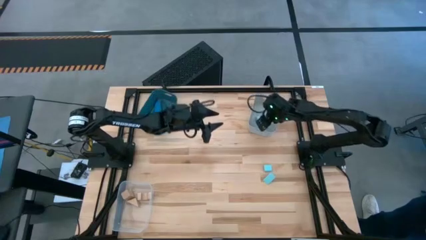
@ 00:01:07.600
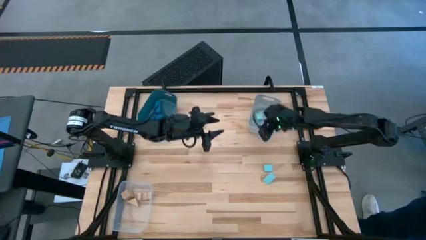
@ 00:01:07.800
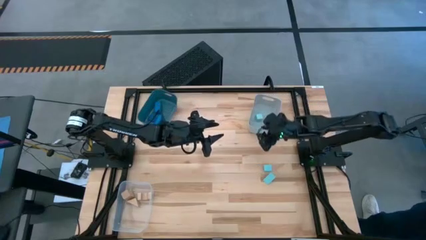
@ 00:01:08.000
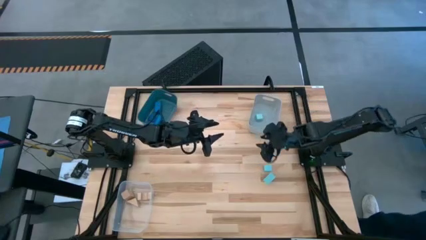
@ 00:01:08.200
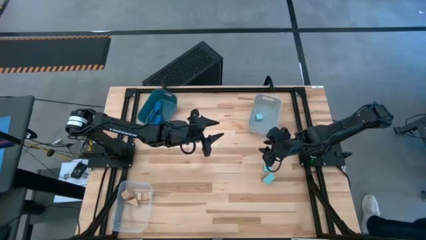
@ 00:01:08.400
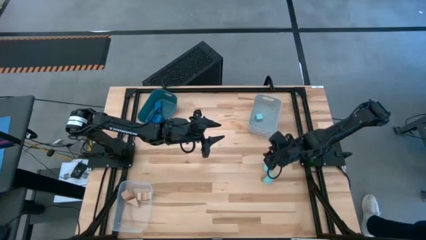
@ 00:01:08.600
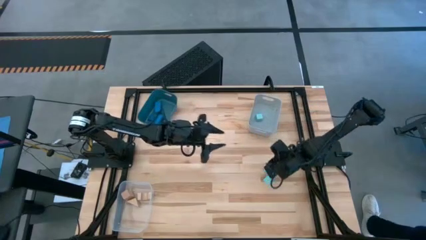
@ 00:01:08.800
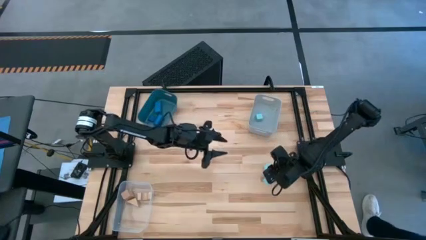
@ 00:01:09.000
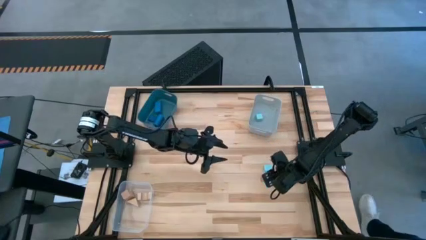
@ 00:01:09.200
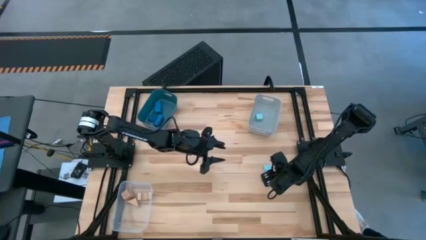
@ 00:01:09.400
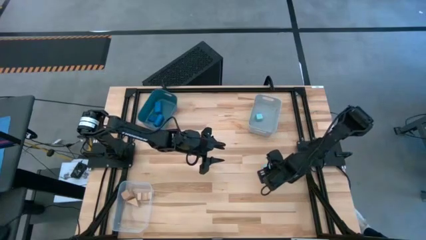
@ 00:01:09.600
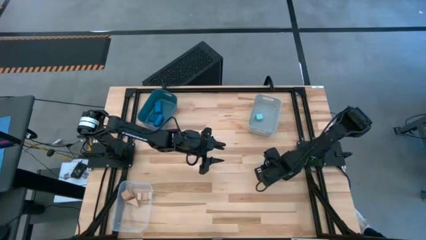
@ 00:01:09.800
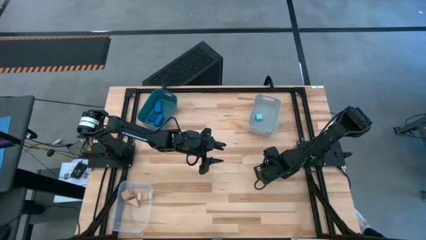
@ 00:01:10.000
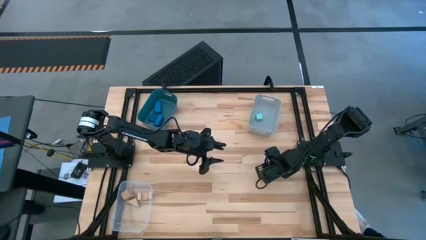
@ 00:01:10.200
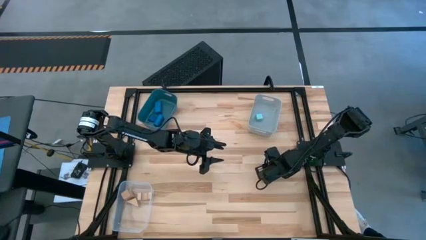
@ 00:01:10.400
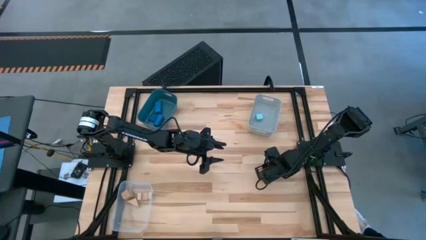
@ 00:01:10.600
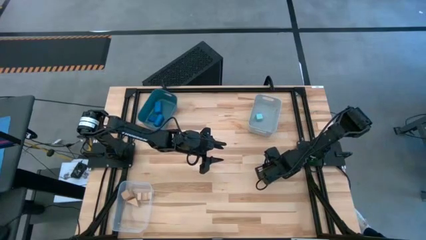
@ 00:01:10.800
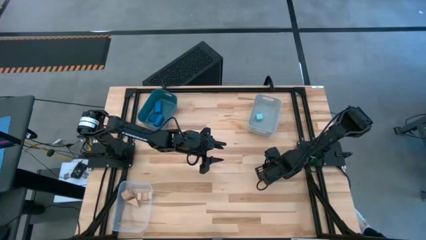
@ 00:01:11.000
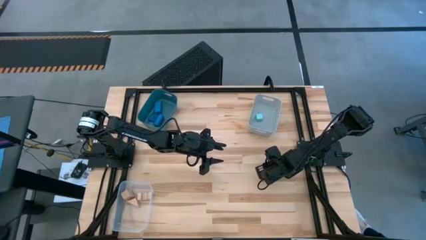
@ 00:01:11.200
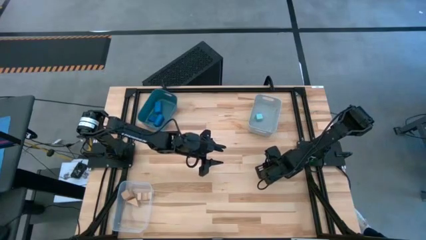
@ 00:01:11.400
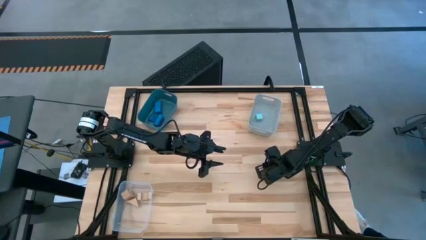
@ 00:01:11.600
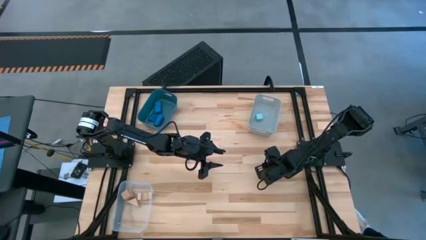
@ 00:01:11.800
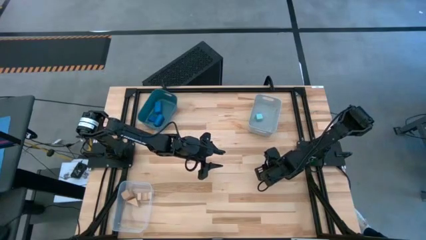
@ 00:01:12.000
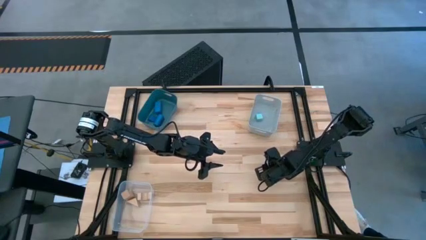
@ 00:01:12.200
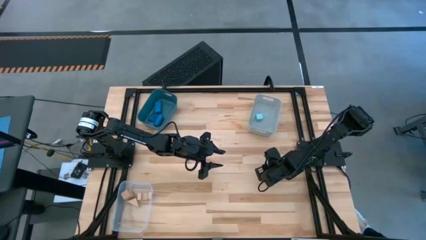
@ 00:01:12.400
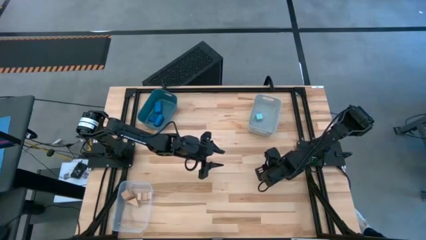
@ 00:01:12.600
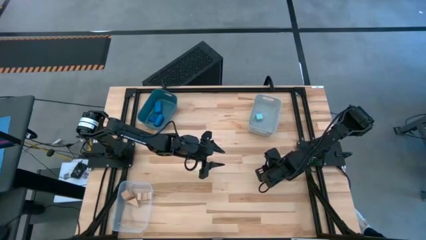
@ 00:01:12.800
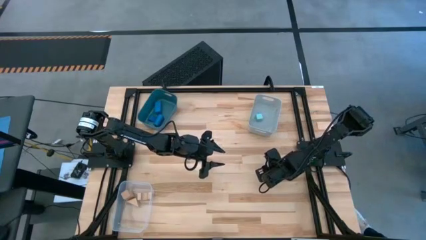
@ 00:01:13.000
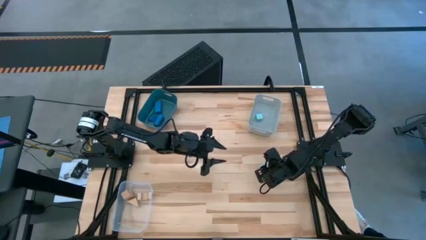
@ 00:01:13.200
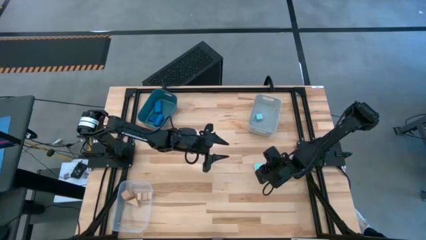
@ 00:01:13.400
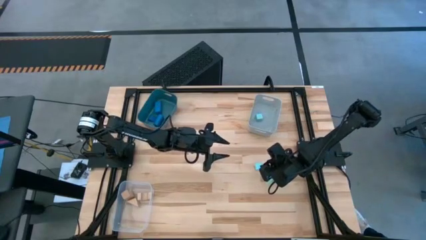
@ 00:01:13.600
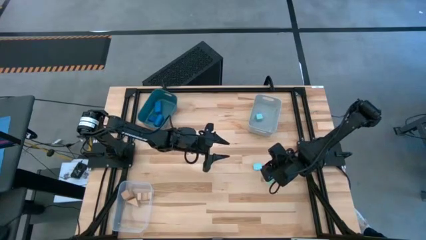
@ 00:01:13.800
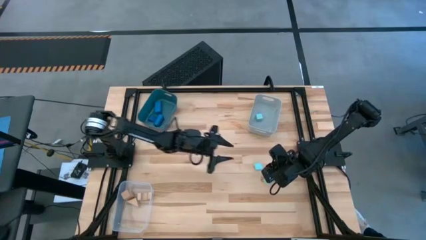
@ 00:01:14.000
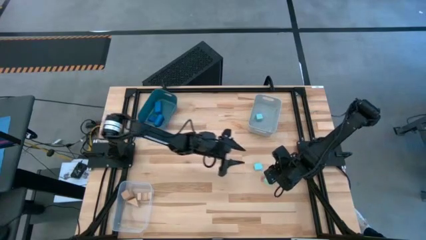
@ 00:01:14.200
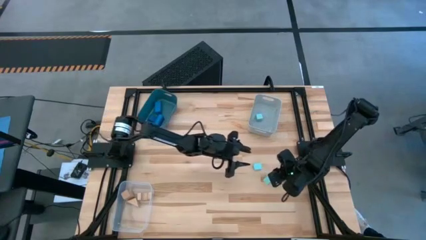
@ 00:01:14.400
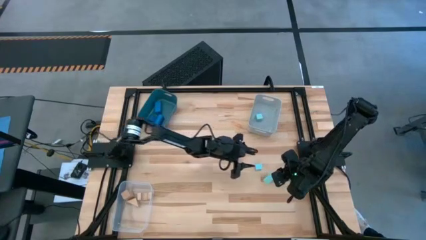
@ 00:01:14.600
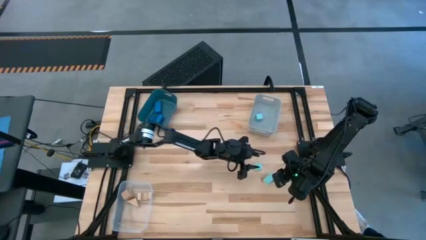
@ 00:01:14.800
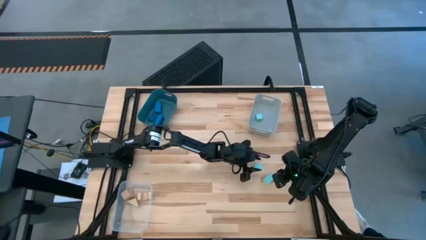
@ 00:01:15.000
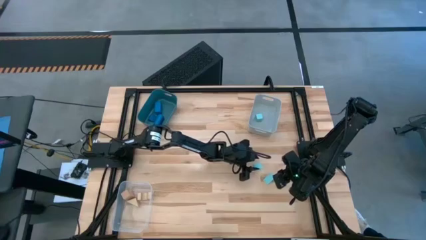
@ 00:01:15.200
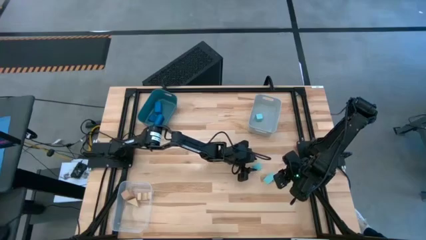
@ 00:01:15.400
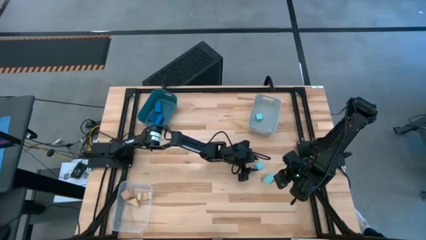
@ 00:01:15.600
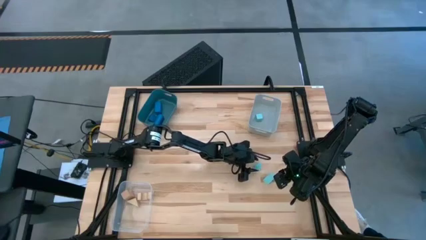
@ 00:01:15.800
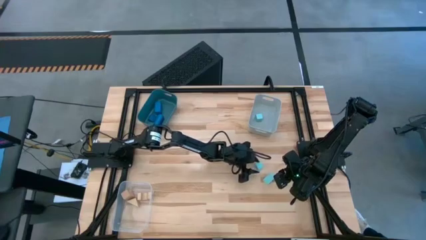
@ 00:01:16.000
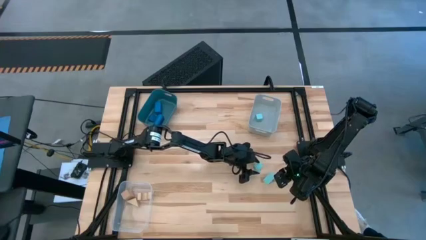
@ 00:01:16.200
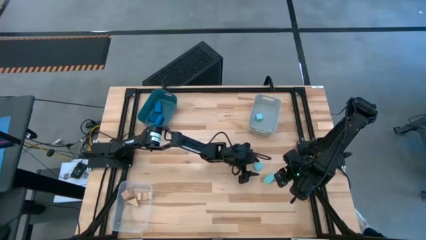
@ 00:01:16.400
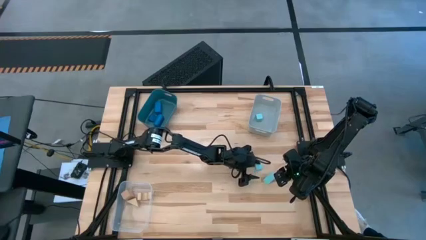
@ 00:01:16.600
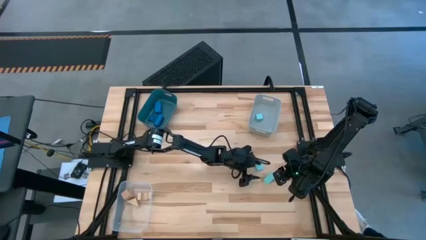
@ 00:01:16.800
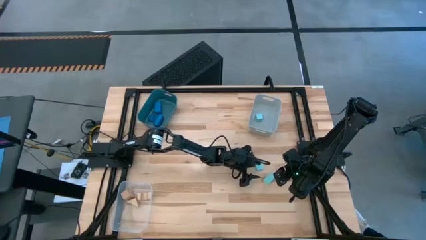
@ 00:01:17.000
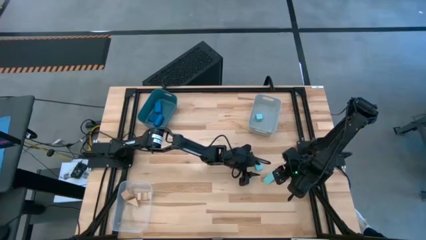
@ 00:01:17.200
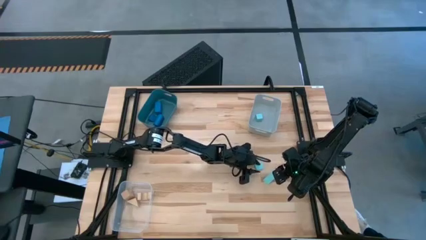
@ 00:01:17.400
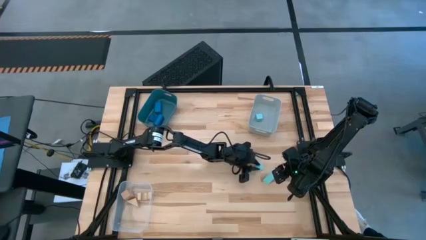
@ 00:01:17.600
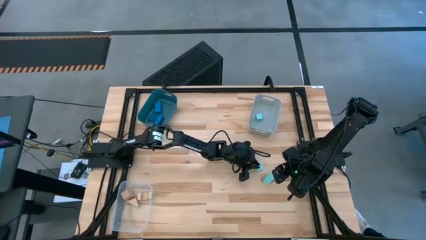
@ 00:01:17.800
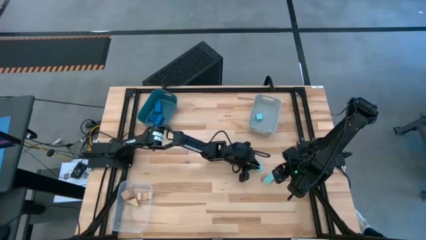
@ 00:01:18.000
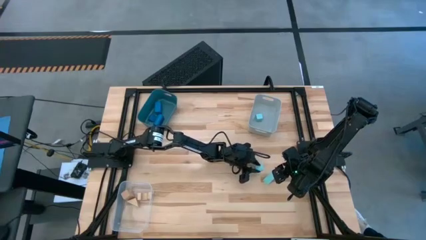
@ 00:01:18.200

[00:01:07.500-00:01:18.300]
Task: Sort & place blocks by color
Put the top light blue block into the gray bin

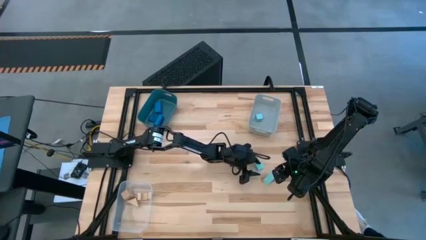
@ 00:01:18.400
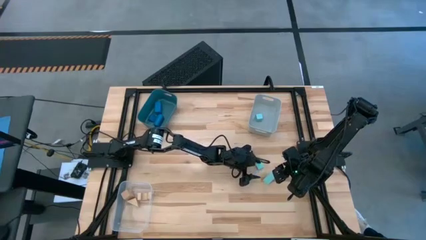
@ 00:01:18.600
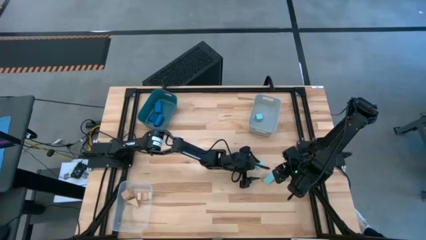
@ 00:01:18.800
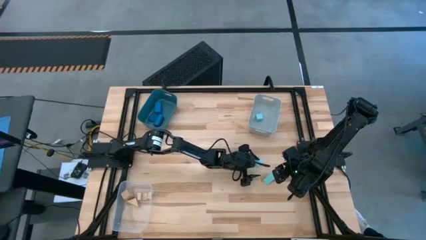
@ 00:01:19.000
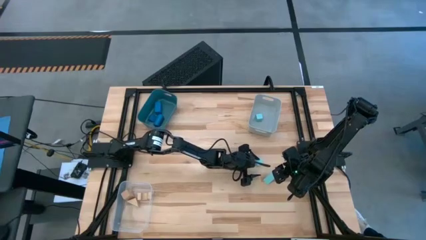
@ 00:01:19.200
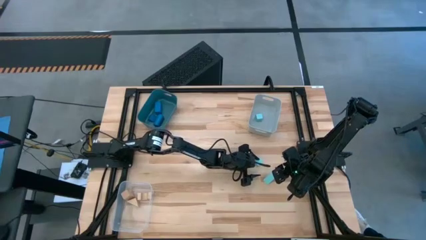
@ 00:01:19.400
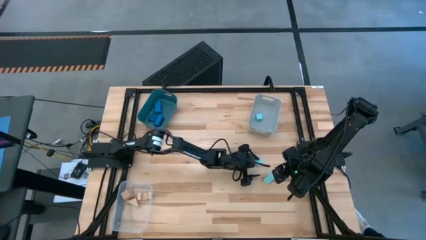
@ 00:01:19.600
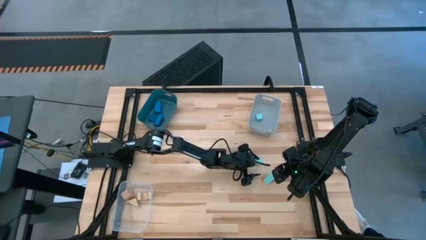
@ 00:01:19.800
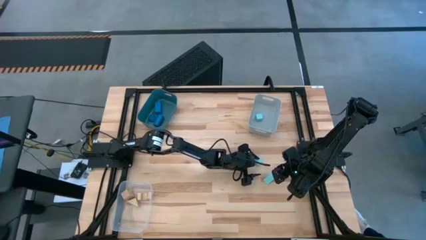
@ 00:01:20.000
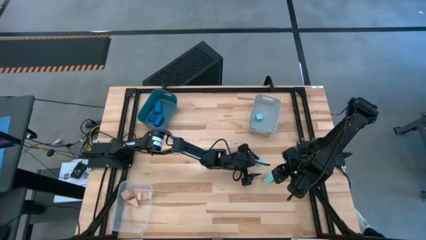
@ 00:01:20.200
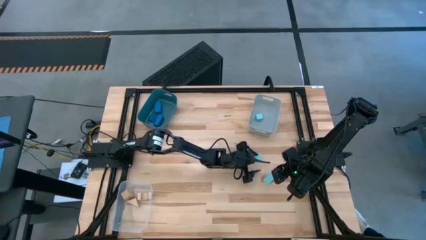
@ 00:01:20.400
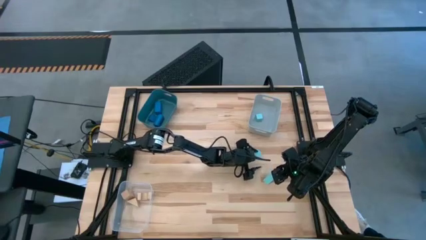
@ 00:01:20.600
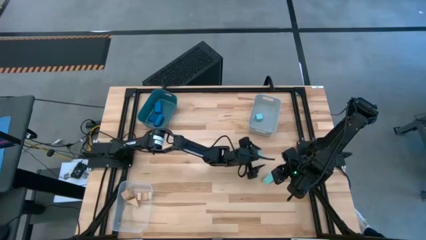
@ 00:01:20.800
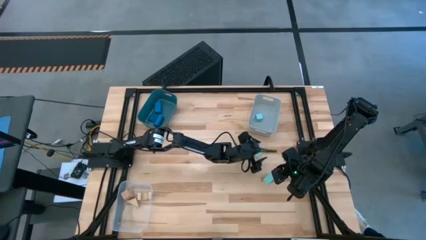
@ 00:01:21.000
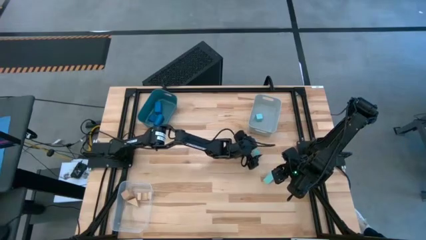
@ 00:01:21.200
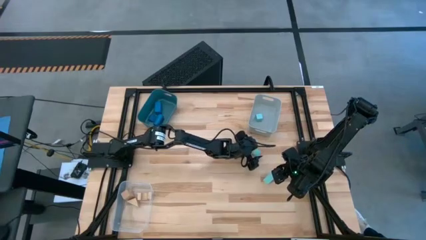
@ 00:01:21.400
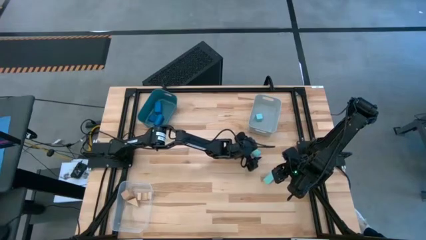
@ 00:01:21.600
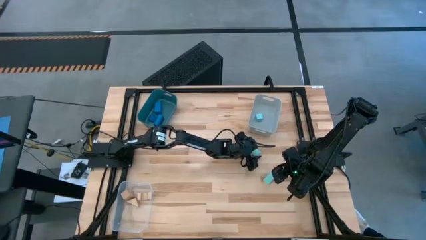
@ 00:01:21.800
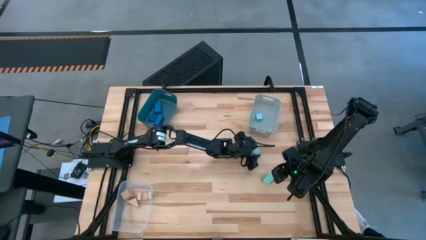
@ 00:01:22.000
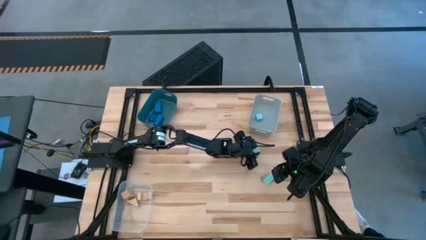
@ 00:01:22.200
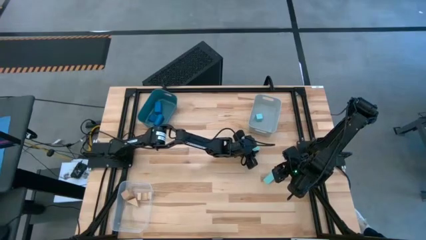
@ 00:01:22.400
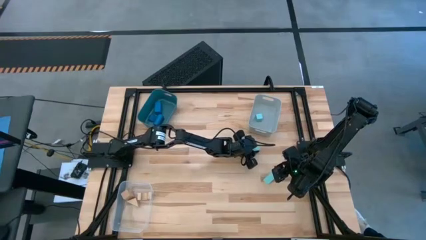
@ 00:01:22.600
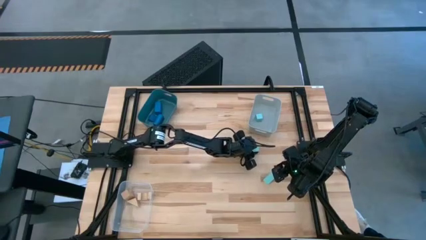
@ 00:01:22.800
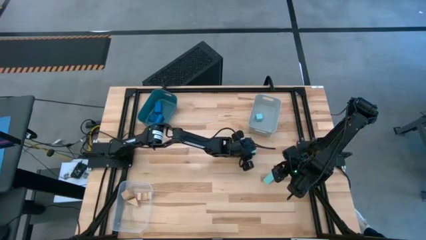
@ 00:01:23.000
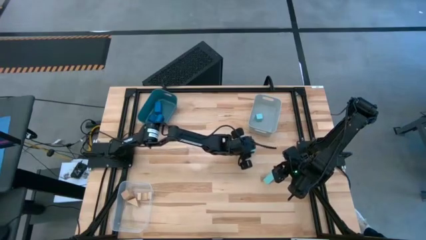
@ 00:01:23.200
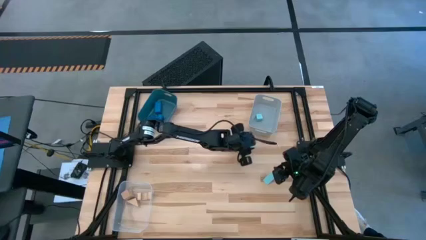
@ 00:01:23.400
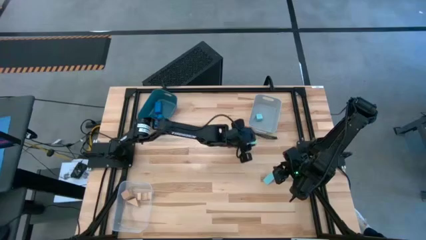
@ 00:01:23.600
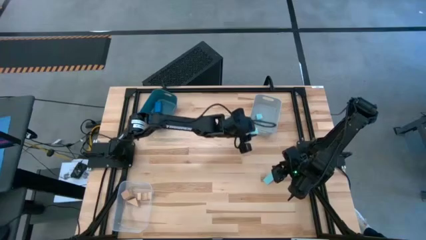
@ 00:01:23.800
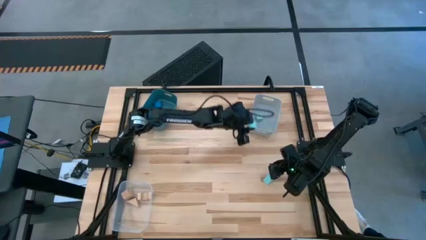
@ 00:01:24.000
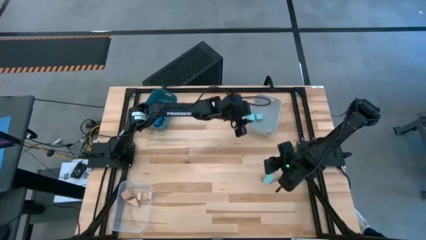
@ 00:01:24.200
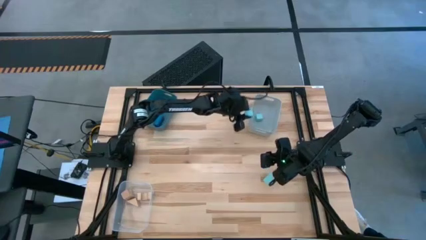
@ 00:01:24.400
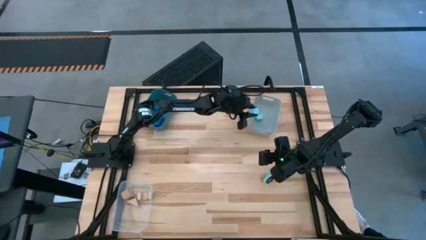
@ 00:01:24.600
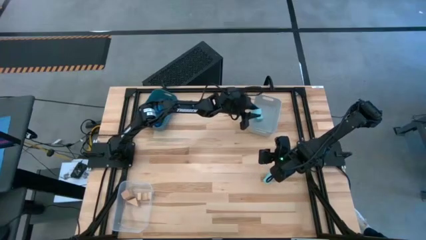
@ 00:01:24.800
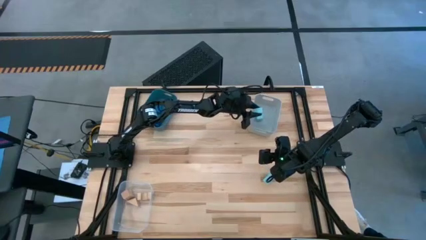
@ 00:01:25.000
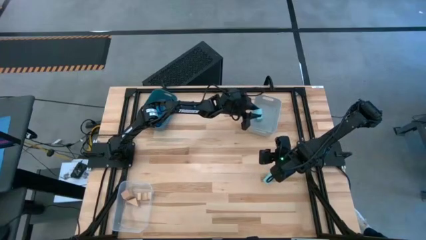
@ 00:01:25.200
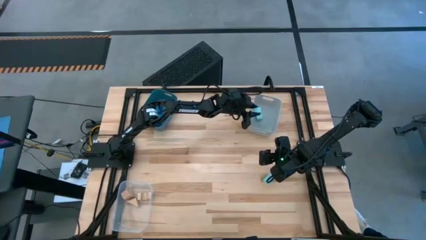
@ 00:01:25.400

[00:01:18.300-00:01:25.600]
Put the top light blue block into the gray bin
